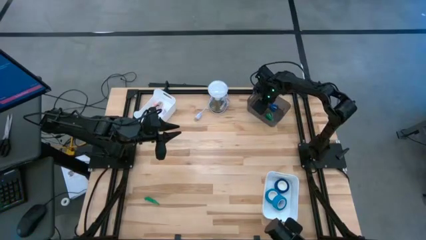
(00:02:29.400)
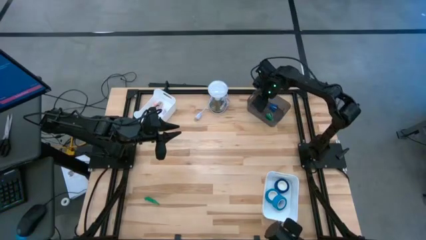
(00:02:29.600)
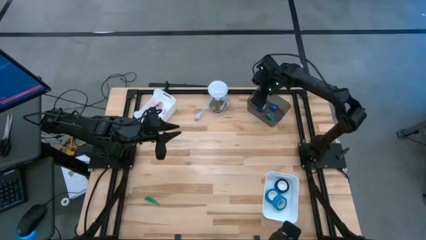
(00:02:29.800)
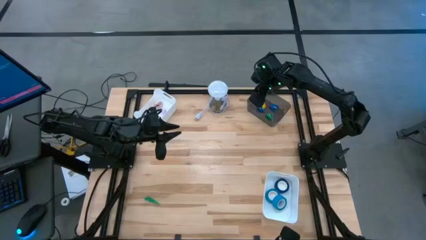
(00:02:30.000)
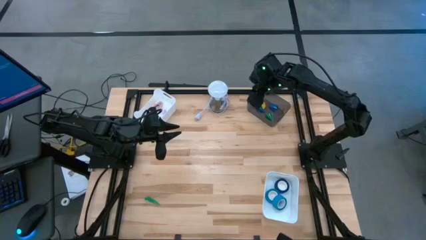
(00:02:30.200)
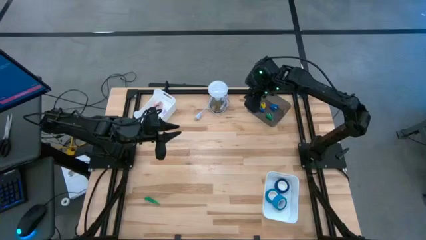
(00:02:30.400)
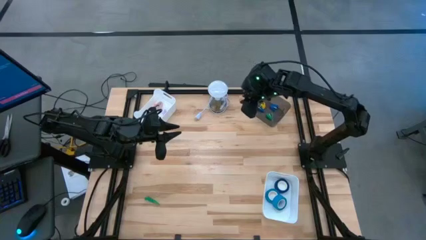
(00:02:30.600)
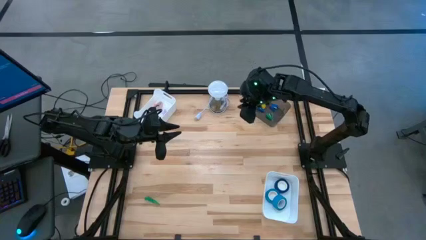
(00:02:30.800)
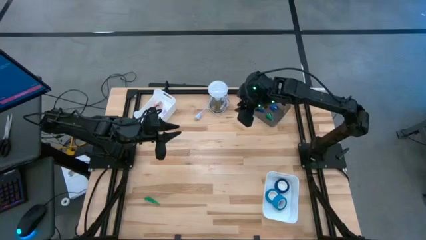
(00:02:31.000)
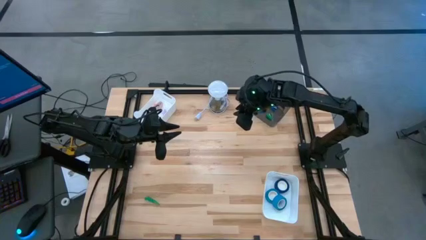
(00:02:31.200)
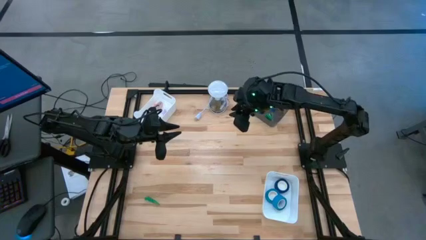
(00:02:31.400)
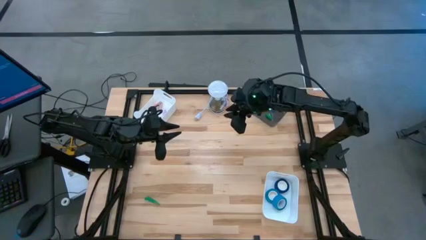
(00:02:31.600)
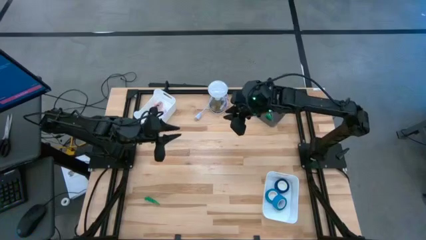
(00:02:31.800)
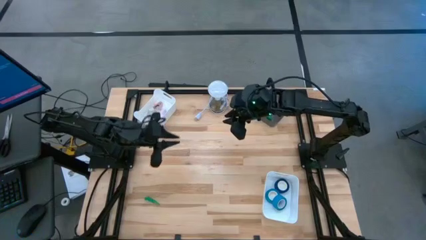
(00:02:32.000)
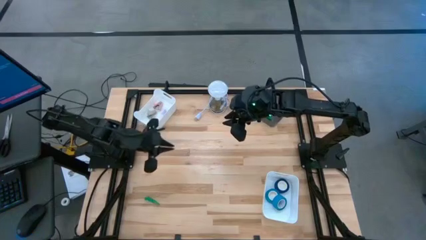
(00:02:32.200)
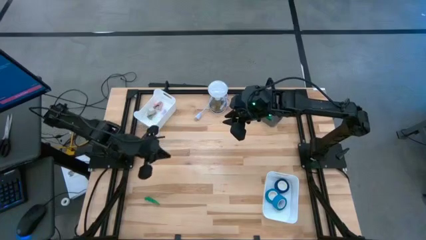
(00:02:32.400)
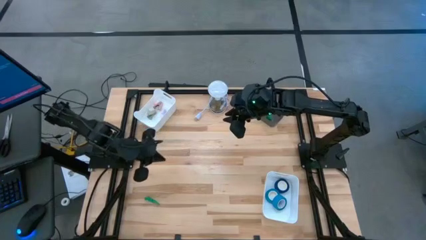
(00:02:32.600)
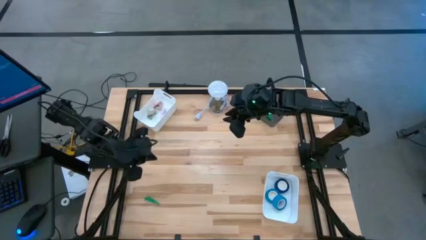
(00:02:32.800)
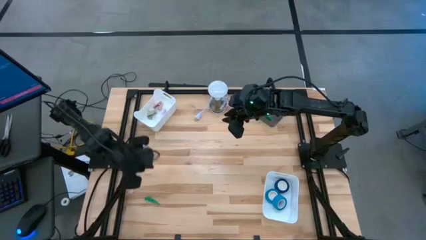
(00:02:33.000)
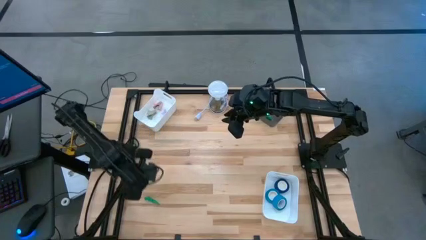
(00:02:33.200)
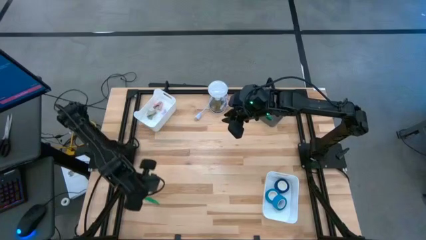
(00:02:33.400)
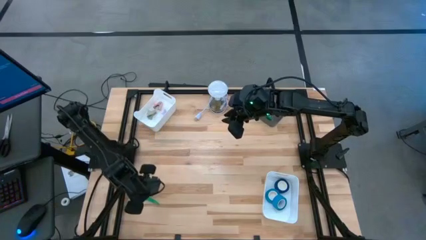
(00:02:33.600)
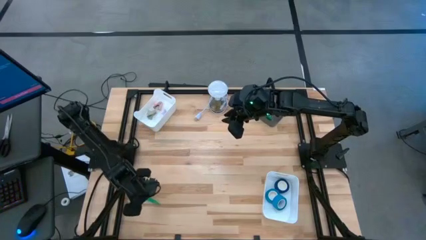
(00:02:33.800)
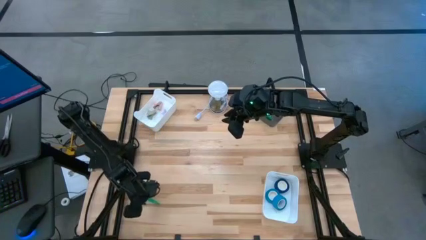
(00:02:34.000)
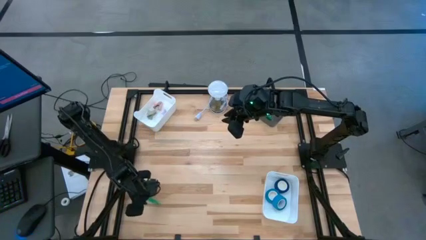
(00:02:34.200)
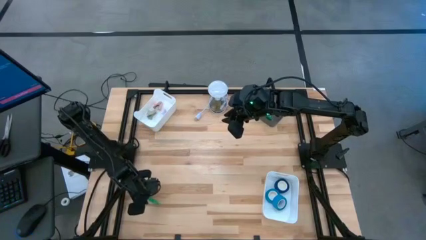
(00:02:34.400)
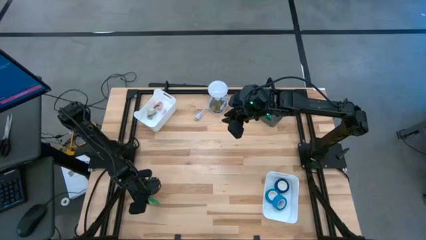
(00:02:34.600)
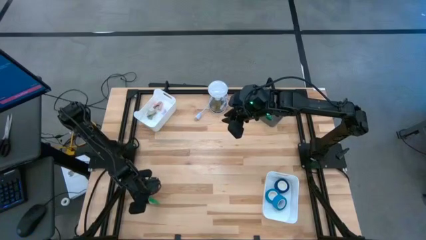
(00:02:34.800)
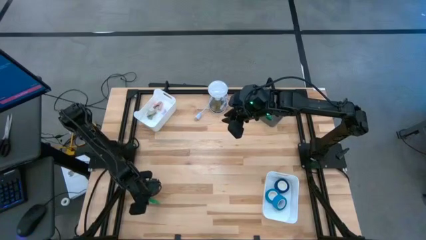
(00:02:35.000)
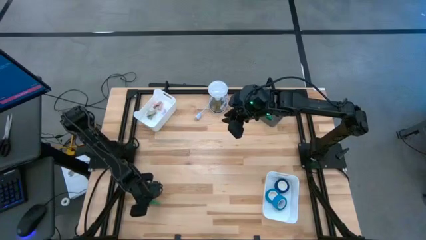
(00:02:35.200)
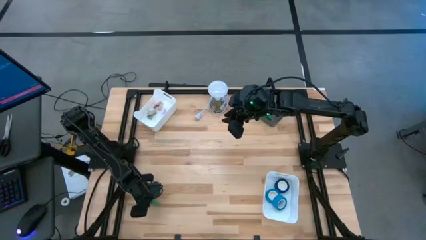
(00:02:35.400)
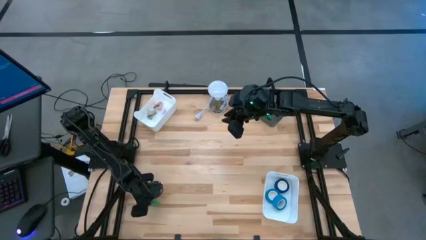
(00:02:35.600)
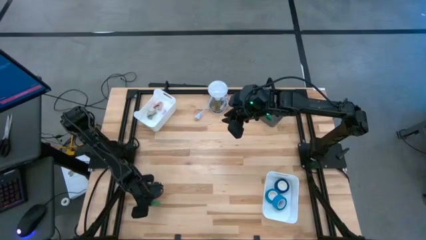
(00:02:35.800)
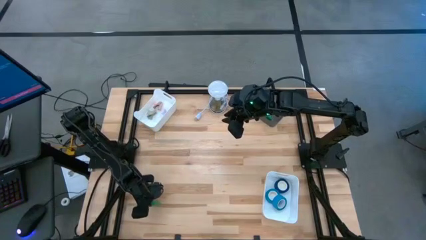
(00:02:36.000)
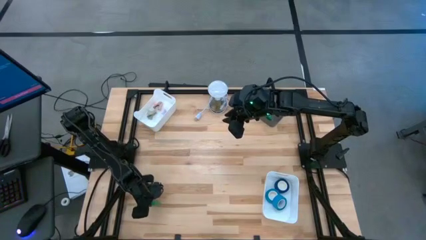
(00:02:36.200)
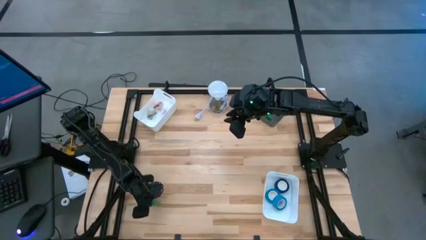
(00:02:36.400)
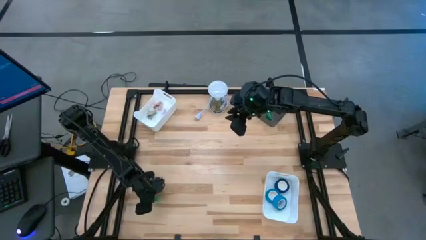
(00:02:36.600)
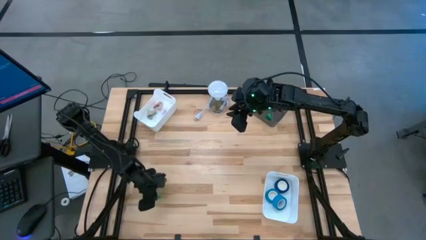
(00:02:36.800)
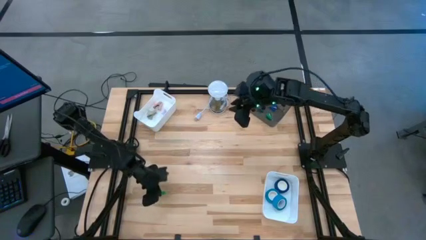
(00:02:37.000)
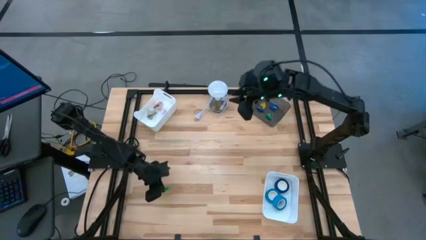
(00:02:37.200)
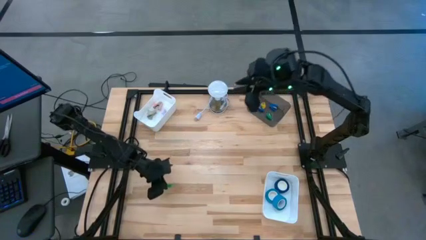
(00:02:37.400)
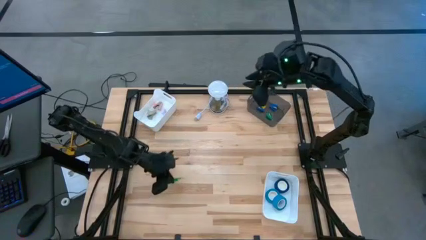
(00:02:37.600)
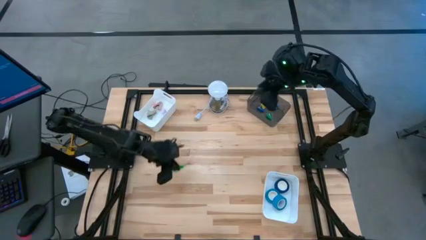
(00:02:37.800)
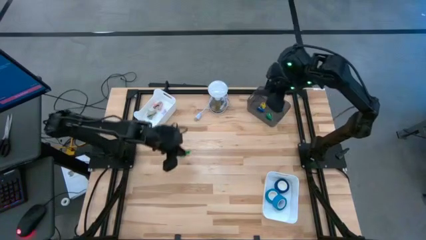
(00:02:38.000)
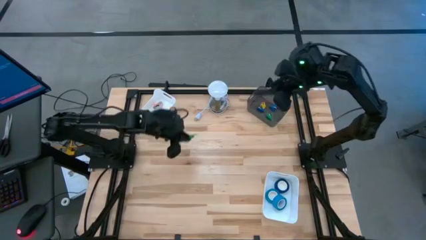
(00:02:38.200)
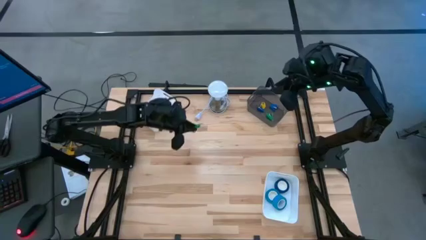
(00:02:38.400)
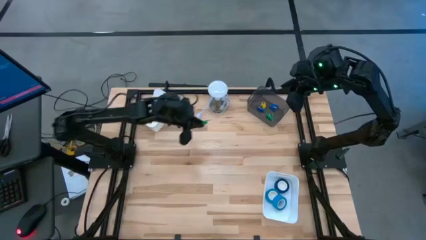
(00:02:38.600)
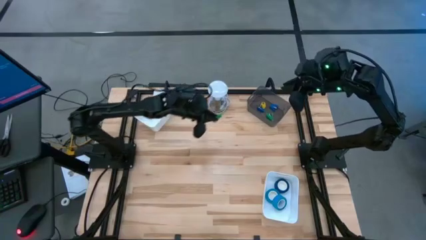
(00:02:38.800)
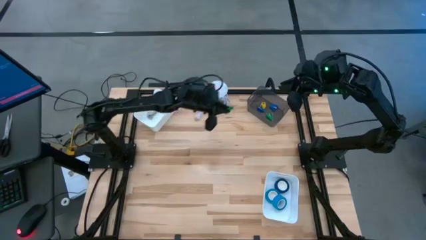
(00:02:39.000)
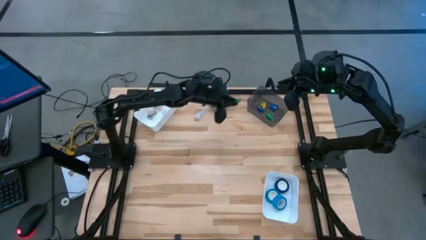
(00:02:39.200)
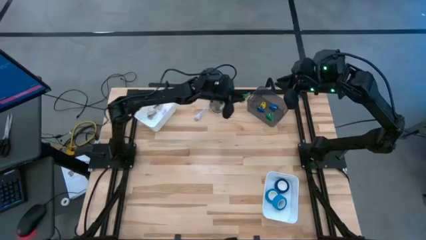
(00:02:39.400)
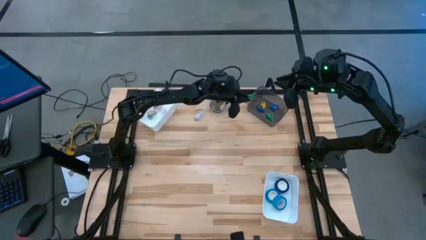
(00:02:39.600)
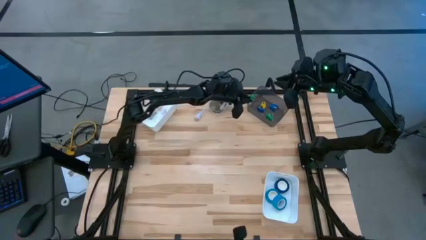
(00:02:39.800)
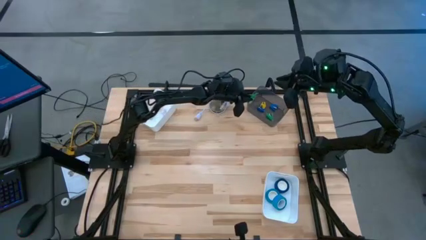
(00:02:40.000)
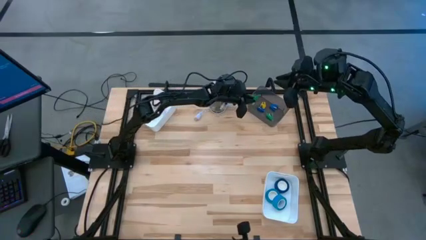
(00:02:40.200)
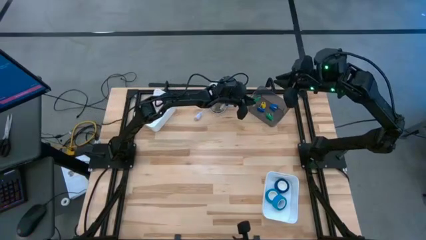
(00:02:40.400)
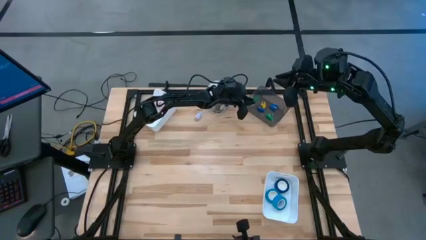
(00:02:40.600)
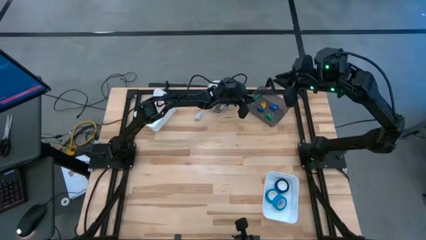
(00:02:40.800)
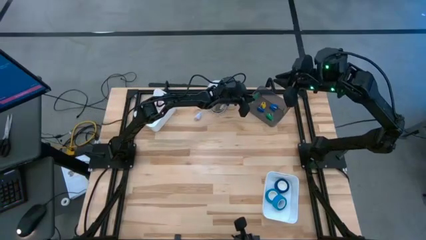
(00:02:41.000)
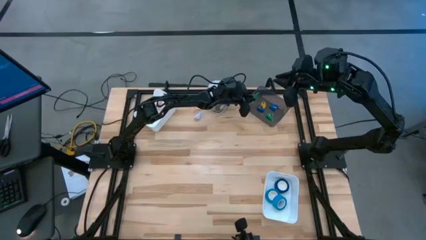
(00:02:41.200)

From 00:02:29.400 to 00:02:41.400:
Task: Pick and place Stapler, Stapler remover, tape
Put the green stapler into the black bin

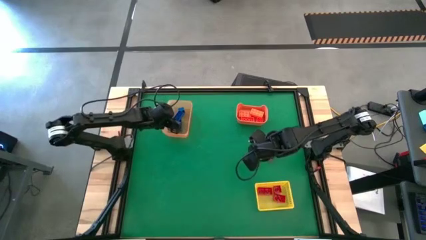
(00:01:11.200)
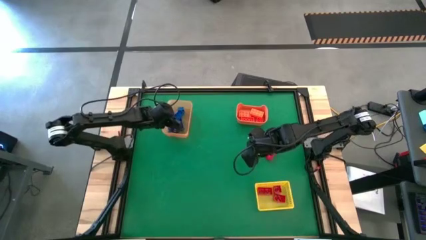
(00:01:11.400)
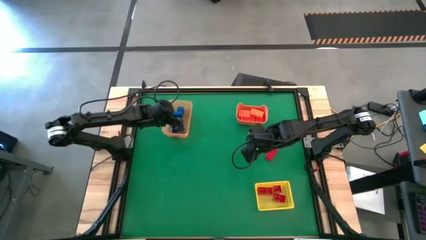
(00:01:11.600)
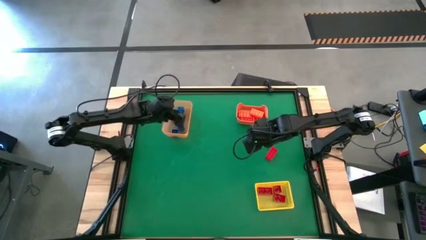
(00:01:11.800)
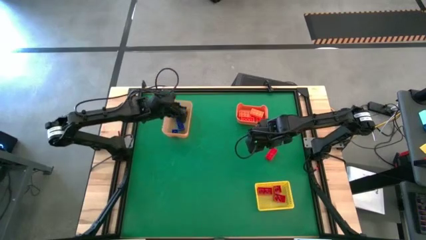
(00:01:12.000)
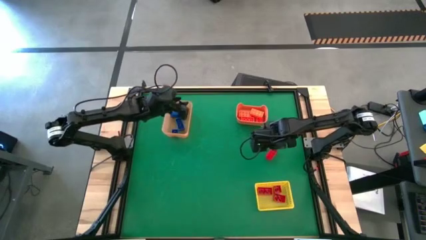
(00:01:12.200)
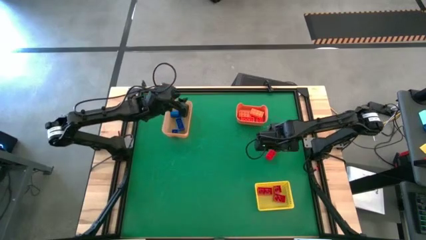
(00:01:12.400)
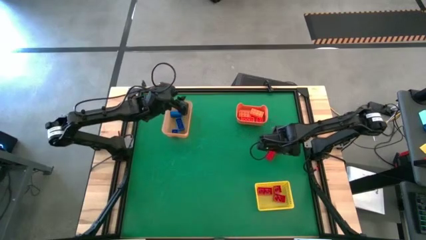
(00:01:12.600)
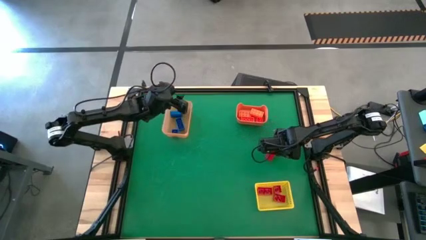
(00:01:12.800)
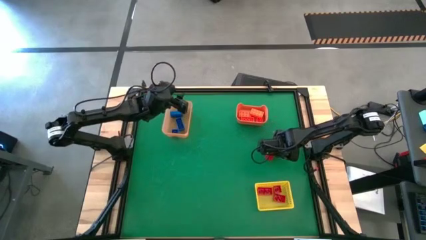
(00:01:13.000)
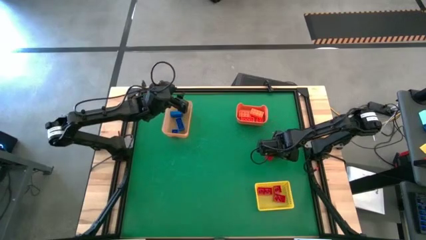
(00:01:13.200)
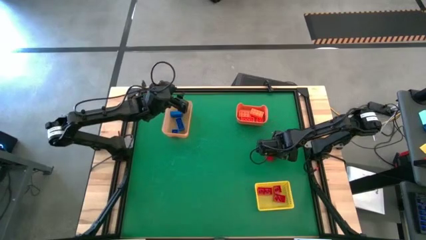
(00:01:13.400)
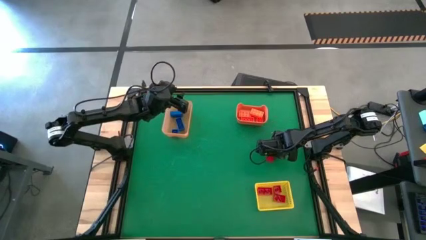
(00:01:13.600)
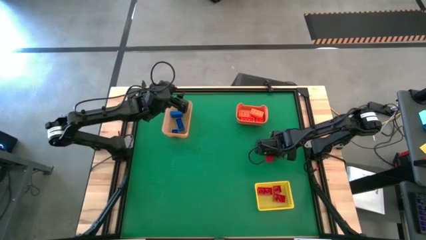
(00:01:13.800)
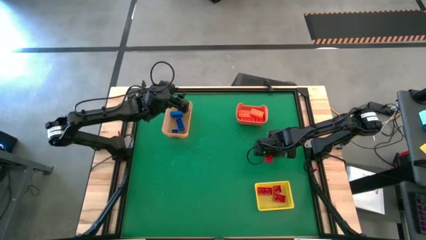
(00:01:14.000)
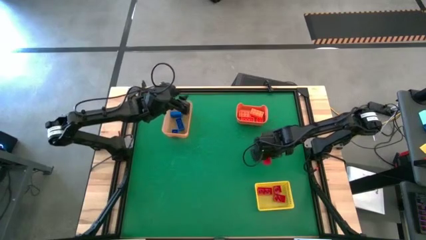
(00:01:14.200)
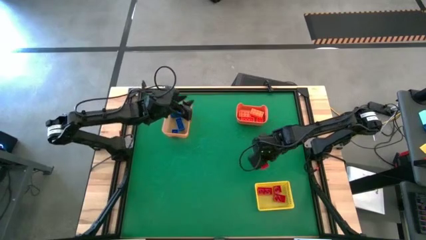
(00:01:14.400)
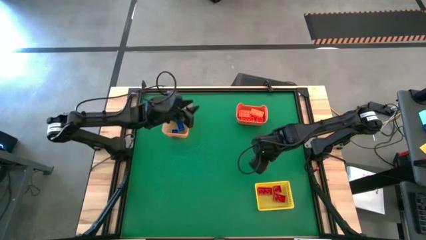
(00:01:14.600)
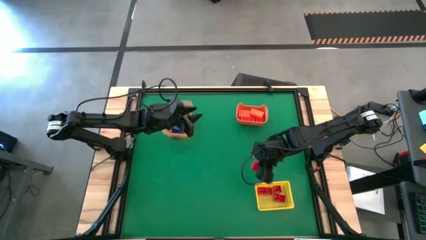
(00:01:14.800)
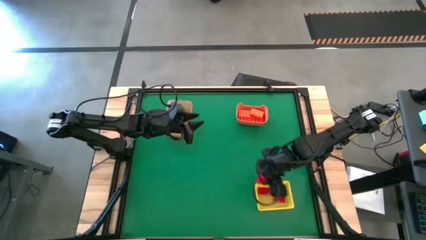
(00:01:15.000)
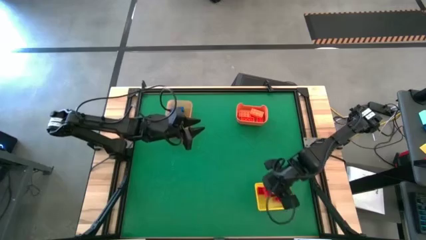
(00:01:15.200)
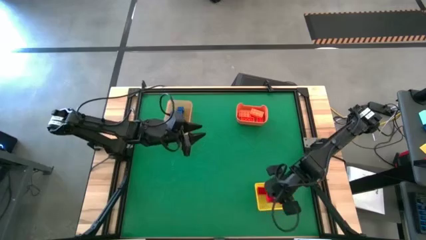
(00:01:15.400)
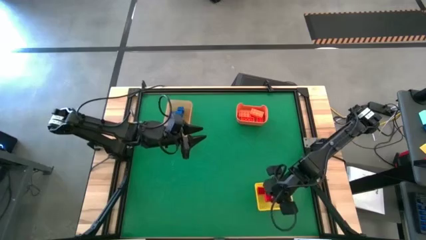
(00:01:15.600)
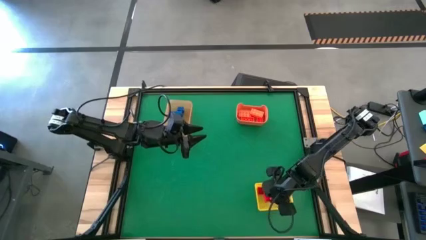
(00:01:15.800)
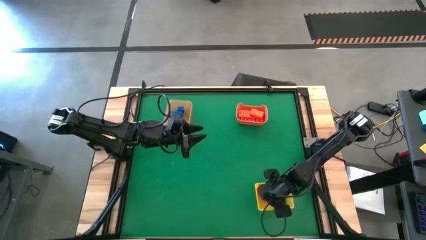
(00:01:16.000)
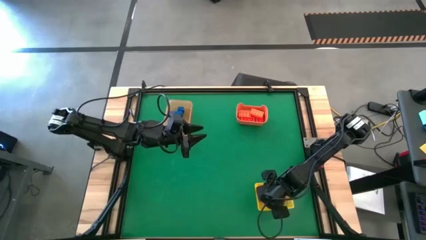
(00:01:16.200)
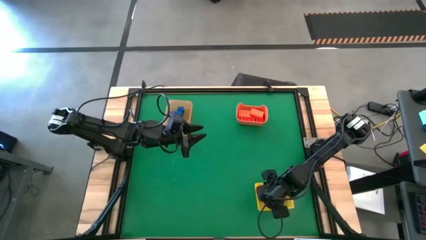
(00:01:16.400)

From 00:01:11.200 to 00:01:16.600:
Task: Sort & place blocks by color
Put the red game piece into the yellow bin
